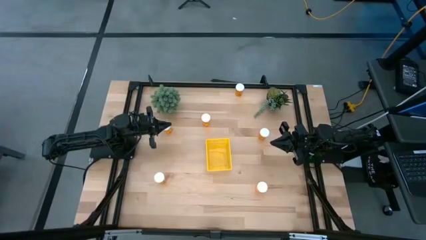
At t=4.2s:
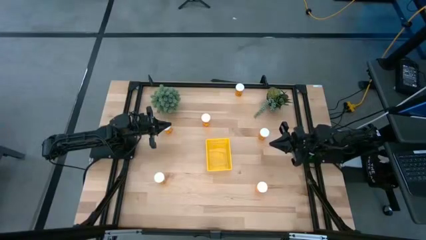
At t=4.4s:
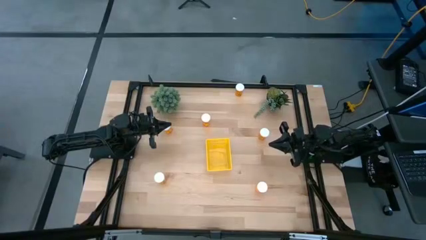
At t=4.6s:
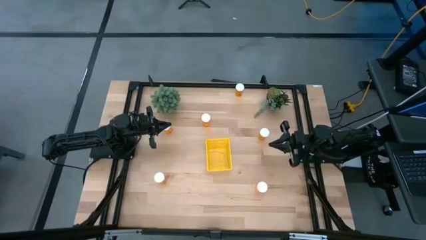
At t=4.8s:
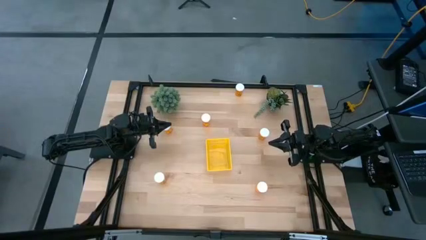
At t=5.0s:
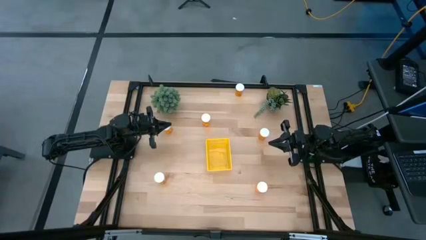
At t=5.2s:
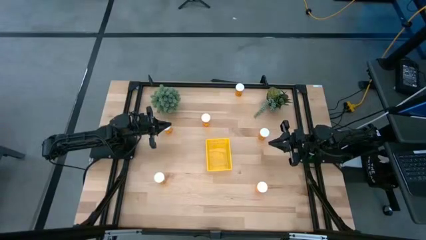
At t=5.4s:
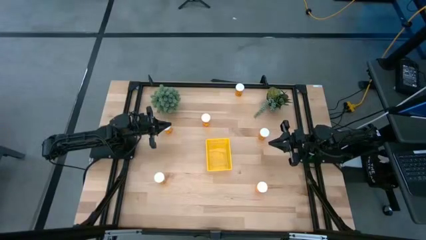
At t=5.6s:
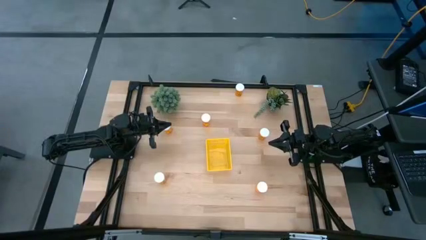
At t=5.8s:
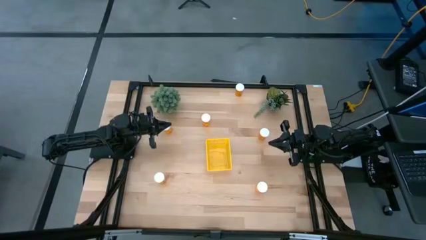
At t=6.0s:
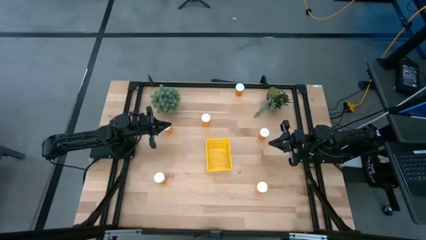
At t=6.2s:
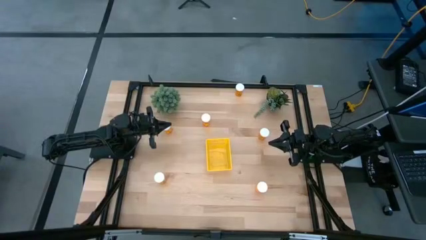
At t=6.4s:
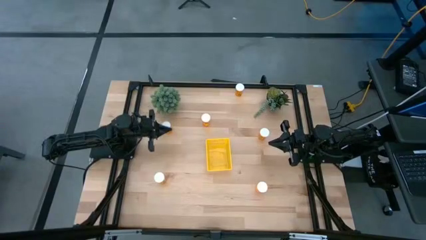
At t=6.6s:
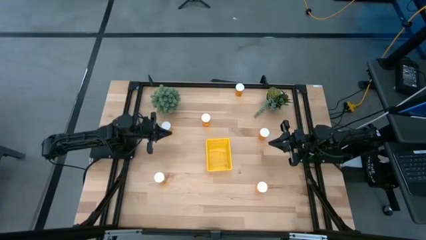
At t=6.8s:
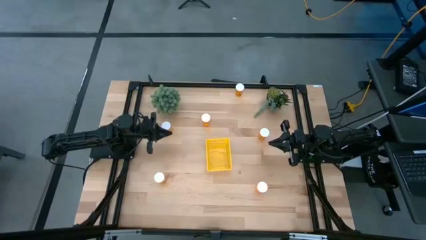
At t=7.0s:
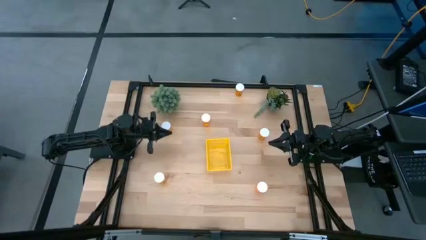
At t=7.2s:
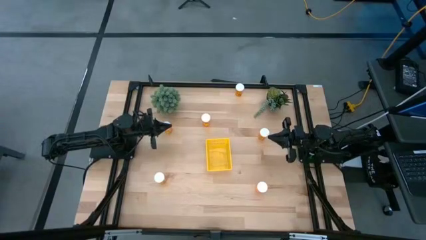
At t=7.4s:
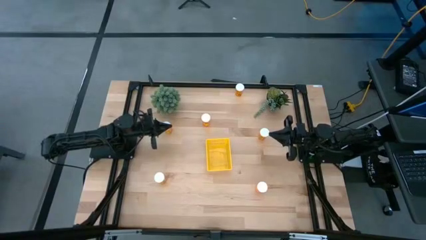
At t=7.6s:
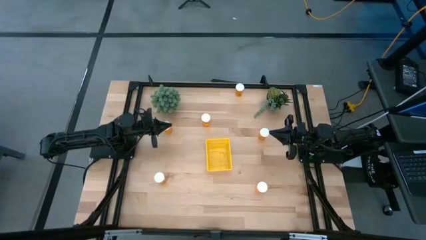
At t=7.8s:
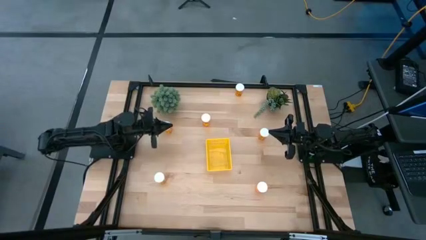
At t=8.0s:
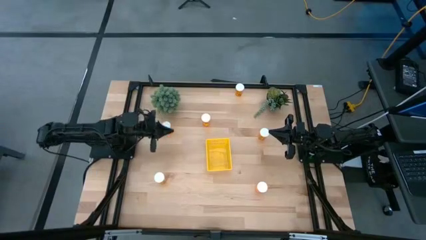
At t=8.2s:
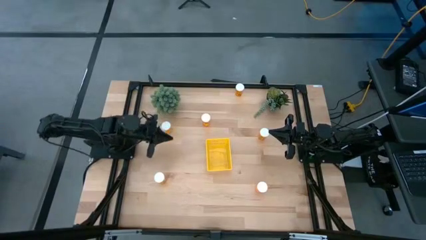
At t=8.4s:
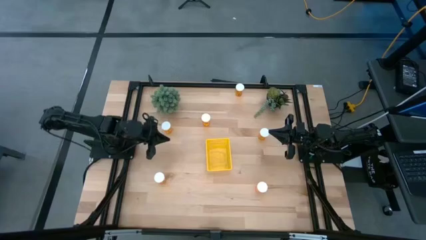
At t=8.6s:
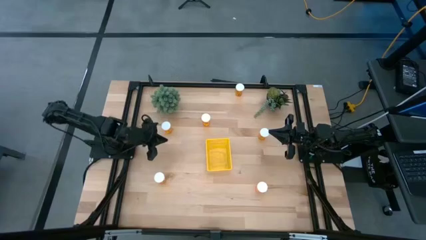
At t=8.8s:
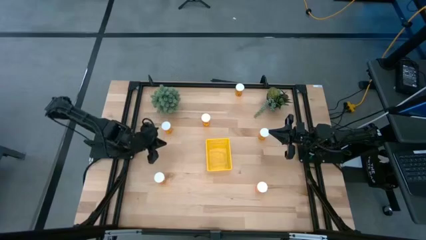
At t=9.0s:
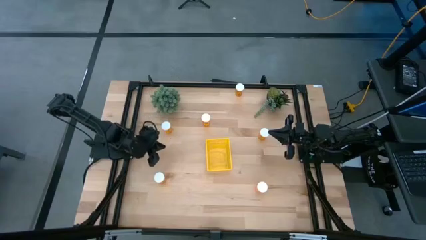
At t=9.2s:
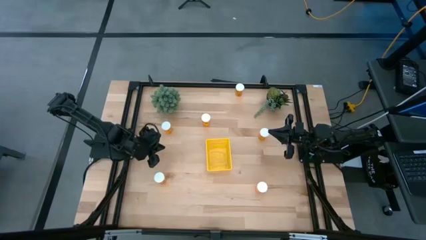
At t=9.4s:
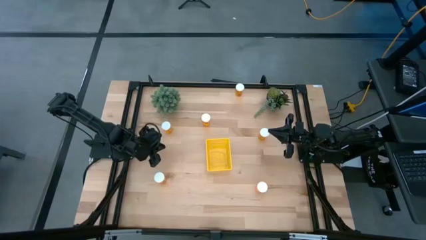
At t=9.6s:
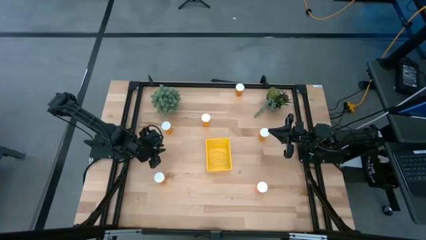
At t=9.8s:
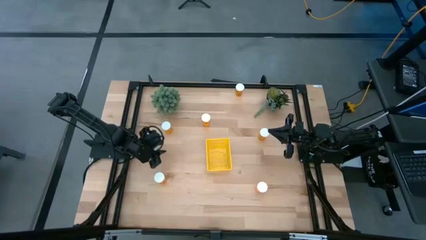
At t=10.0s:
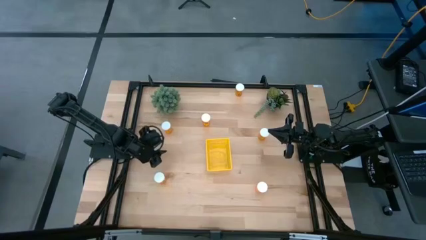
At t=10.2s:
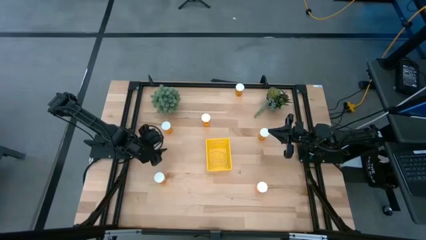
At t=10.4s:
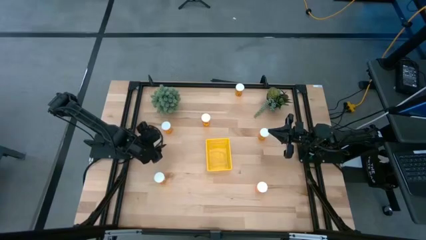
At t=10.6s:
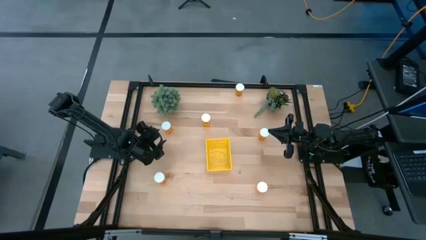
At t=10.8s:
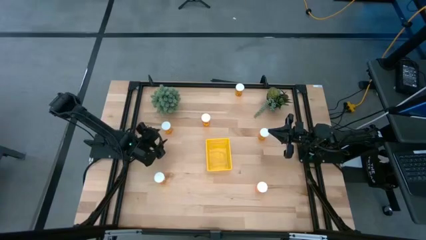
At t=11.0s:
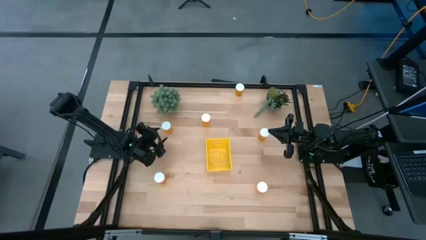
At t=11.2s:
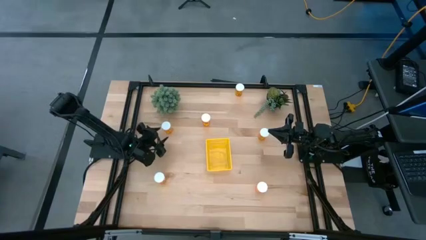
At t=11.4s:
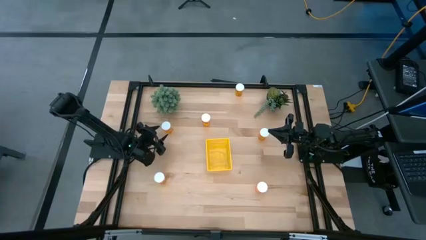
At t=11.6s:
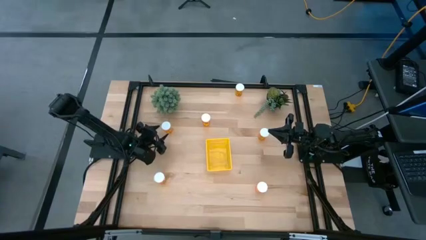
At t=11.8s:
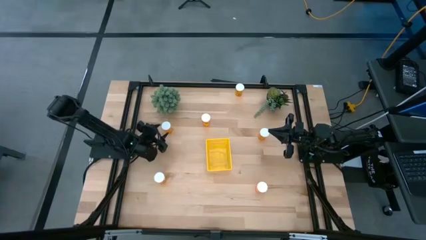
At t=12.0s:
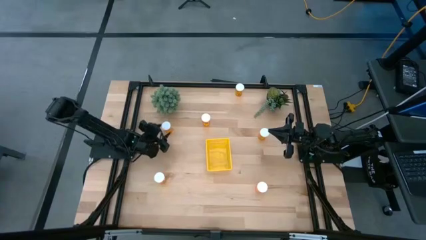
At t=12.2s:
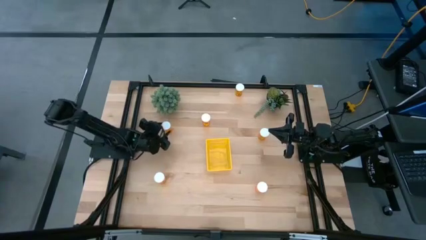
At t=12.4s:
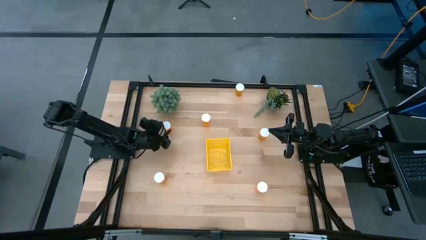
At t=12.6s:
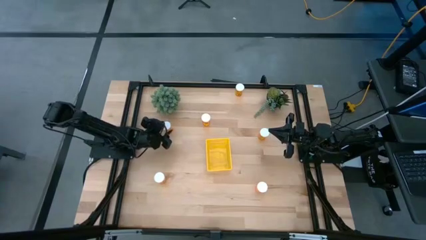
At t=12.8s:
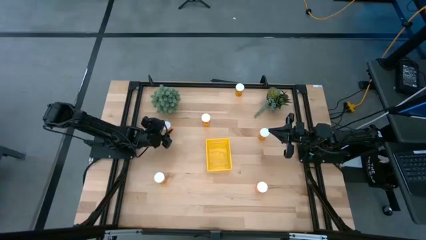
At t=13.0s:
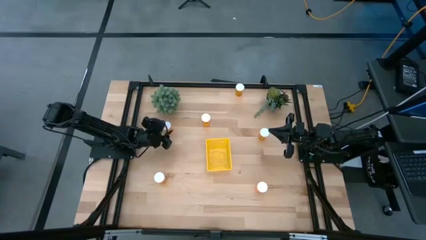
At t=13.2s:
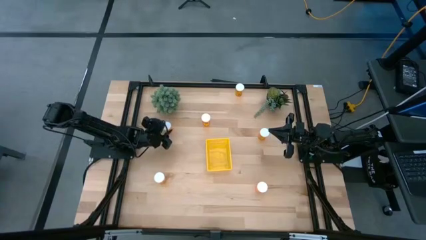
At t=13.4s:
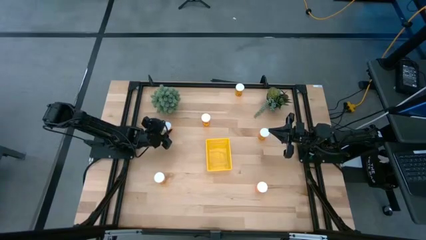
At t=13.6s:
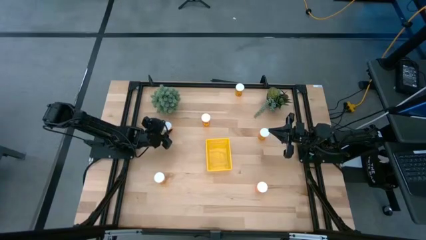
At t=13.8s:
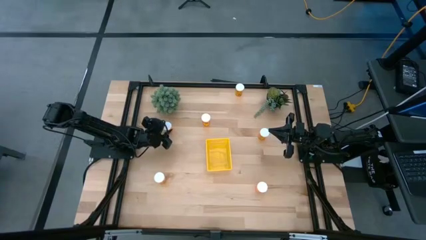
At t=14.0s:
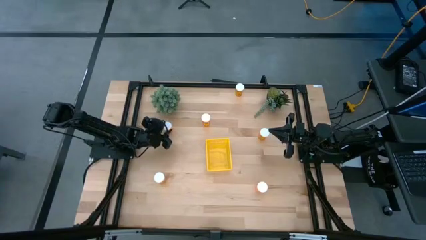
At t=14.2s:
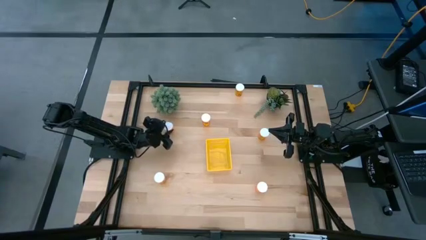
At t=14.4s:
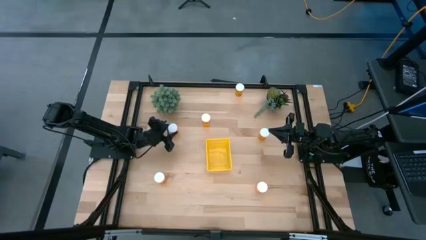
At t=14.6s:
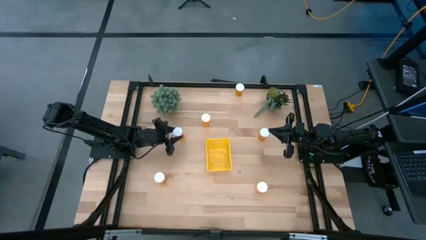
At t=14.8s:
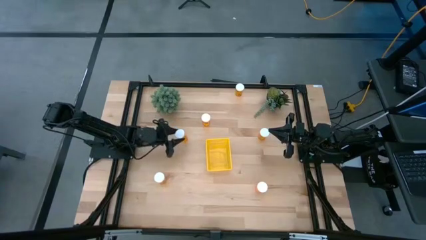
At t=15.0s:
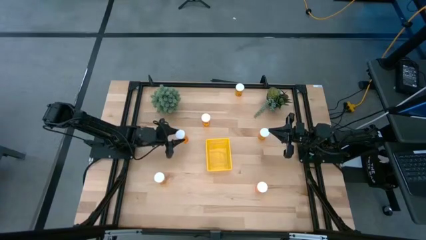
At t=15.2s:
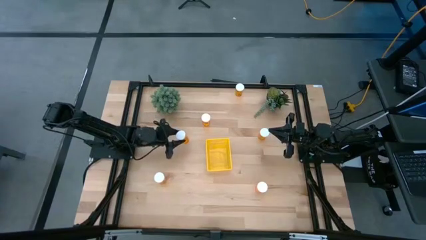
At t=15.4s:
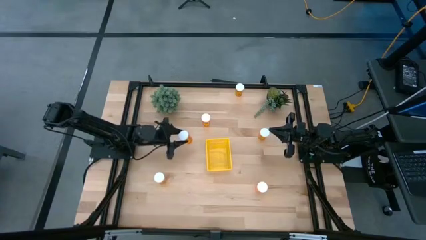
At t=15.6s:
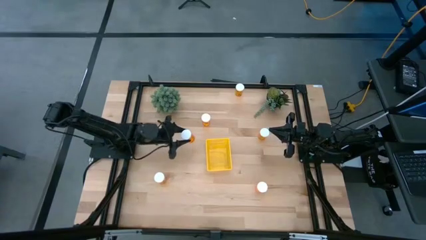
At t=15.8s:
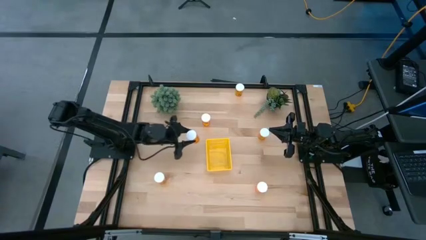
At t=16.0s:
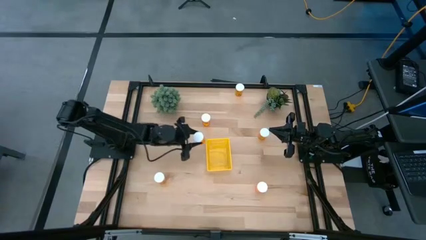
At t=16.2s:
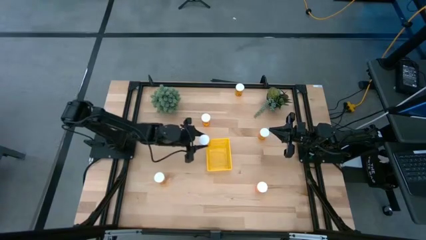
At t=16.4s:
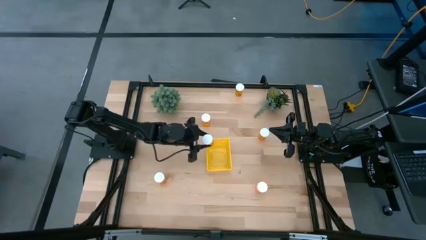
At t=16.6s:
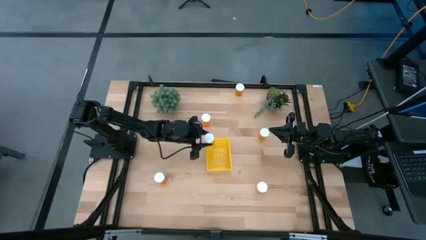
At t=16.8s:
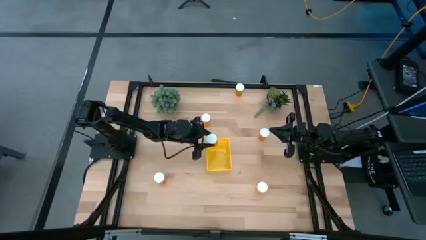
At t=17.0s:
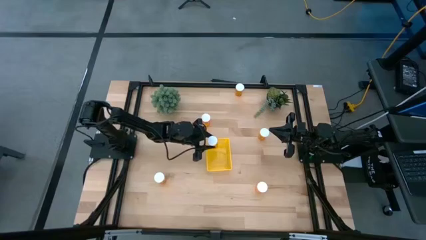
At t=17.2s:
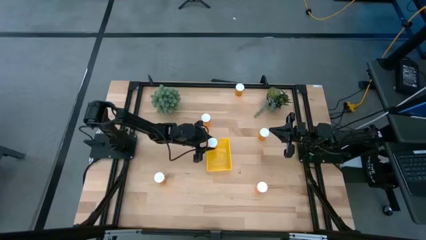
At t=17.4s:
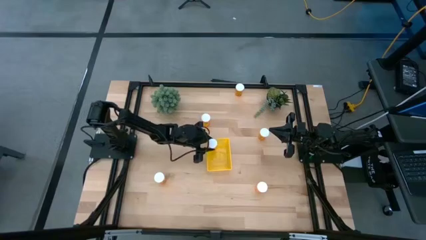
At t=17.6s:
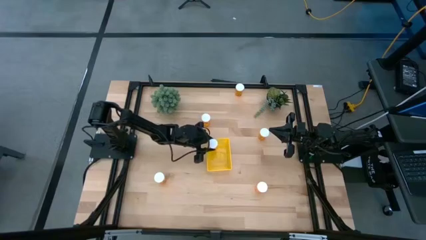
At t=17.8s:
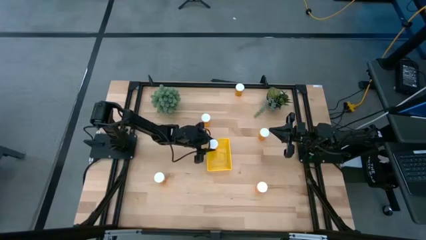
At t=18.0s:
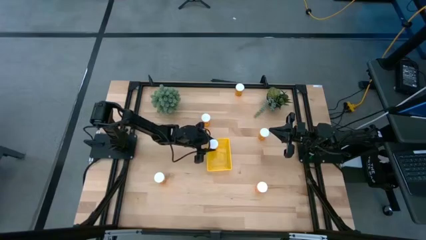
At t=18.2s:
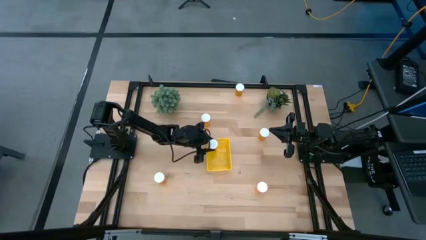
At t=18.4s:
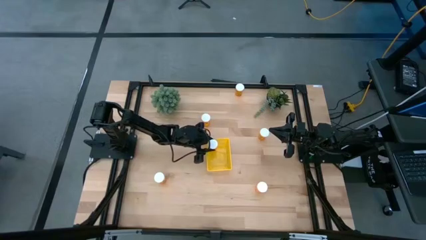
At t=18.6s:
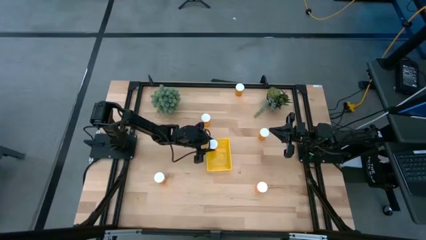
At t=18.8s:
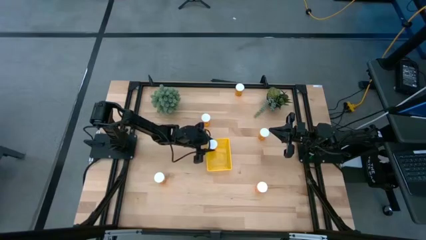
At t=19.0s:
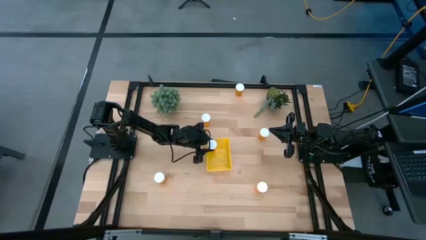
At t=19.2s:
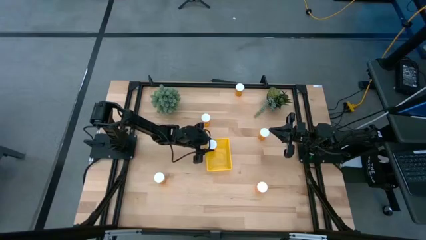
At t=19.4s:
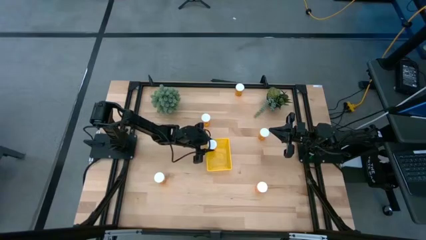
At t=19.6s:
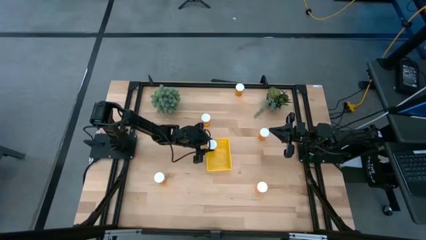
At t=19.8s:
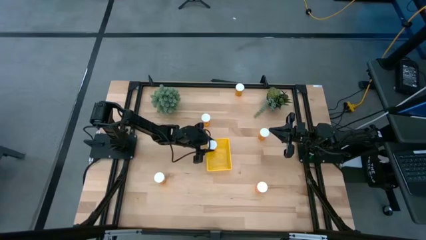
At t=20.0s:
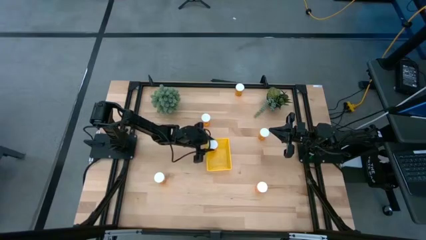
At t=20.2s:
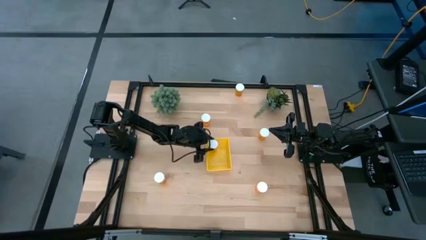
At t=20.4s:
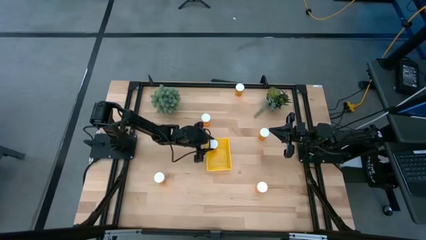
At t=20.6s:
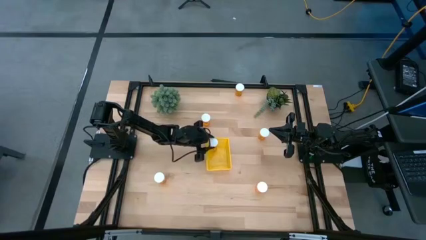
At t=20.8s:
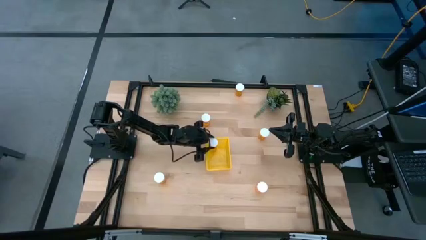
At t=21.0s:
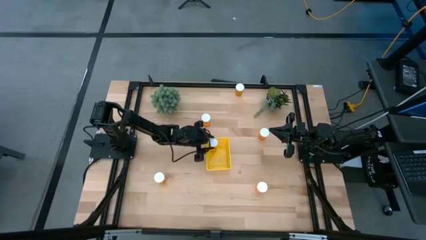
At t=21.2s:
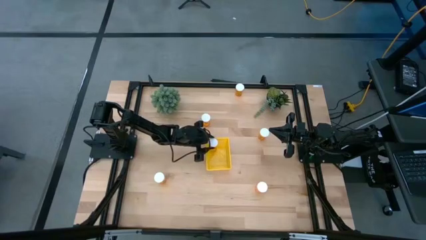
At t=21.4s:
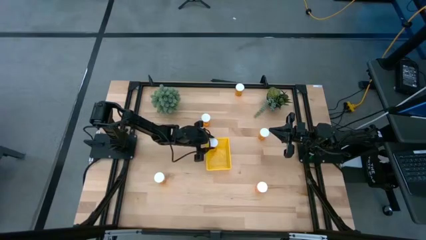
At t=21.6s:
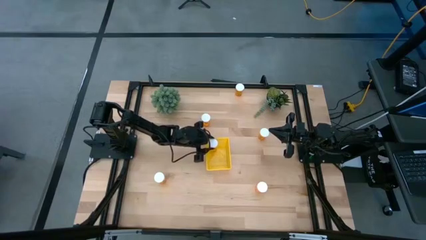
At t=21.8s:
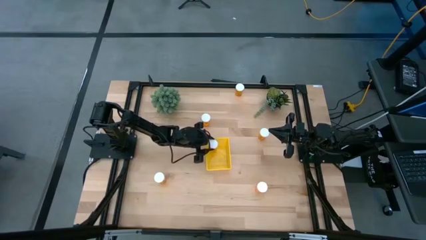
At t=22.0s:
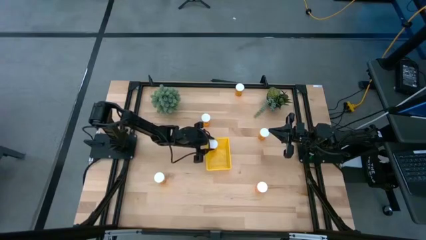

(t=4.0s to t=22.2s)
Task: Pick and place pill bottles into a basket
Put the orange pill bottle into the yellow bin
